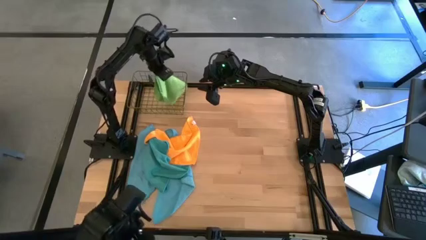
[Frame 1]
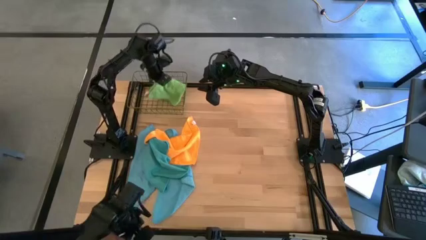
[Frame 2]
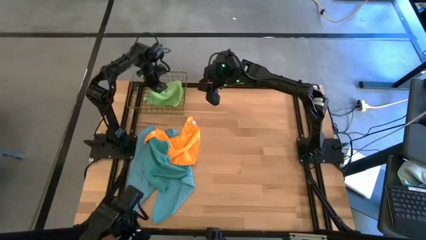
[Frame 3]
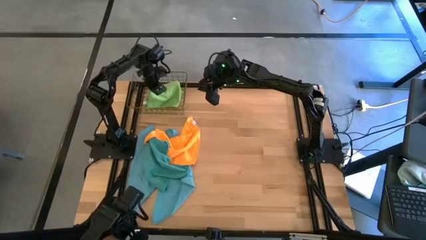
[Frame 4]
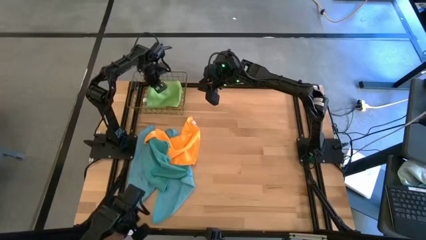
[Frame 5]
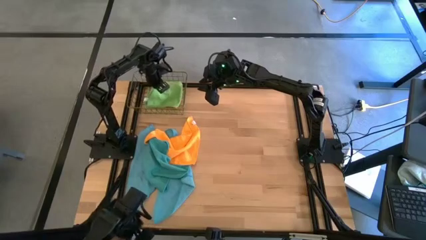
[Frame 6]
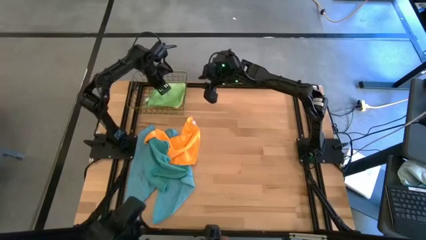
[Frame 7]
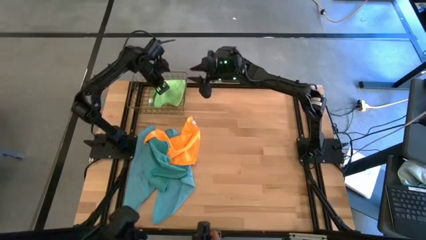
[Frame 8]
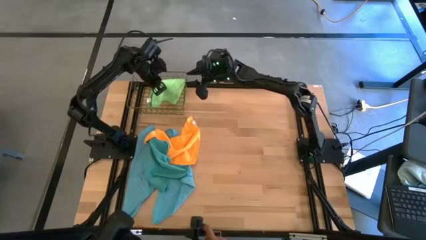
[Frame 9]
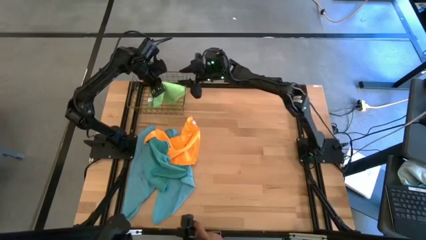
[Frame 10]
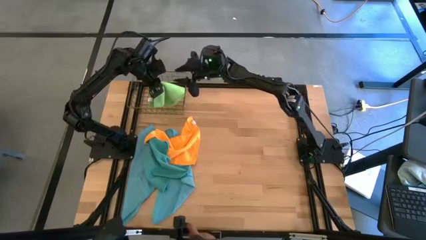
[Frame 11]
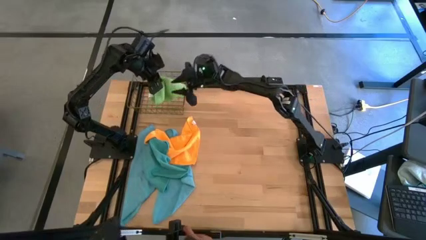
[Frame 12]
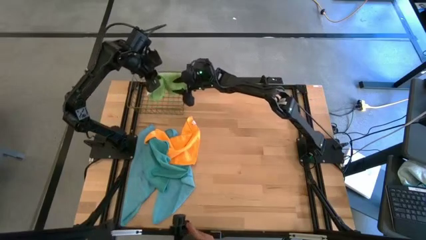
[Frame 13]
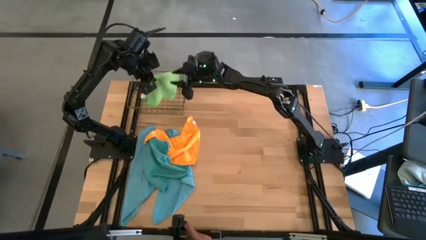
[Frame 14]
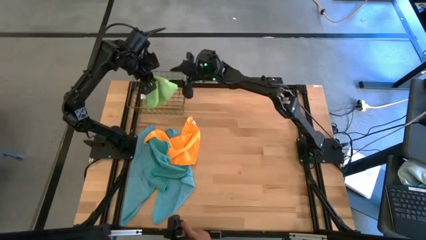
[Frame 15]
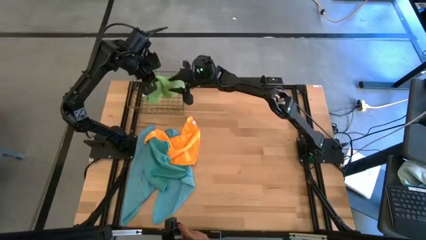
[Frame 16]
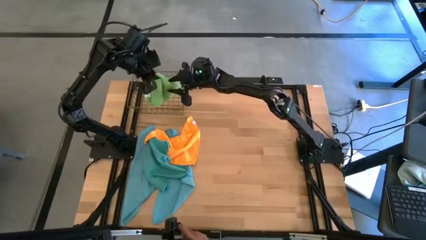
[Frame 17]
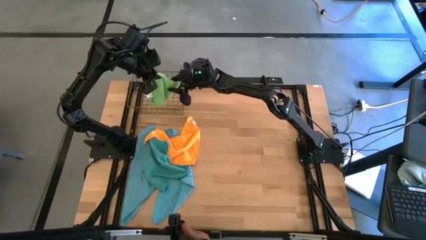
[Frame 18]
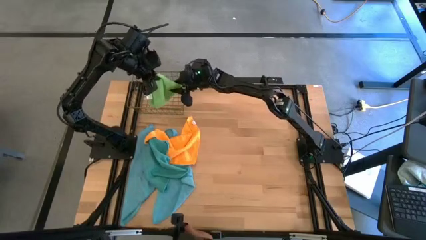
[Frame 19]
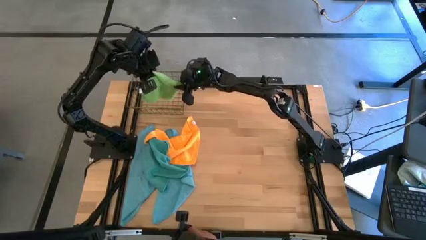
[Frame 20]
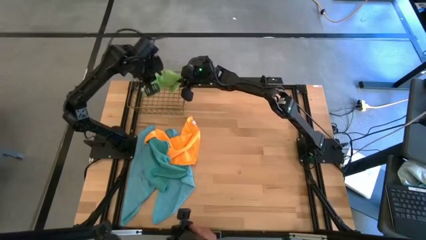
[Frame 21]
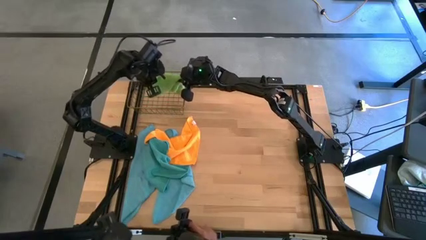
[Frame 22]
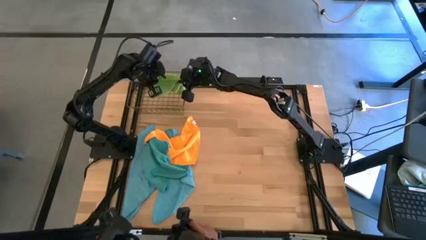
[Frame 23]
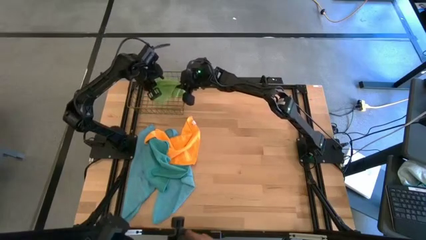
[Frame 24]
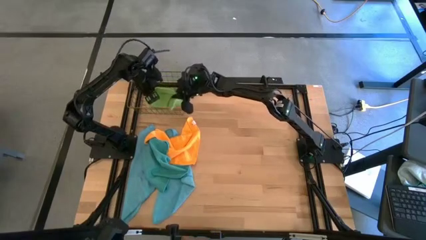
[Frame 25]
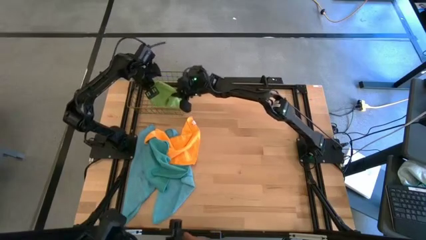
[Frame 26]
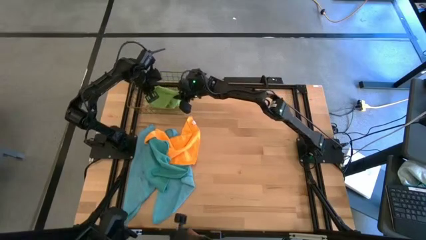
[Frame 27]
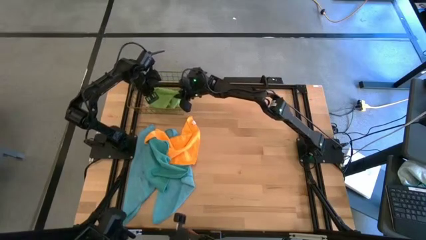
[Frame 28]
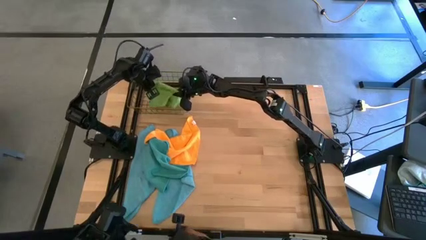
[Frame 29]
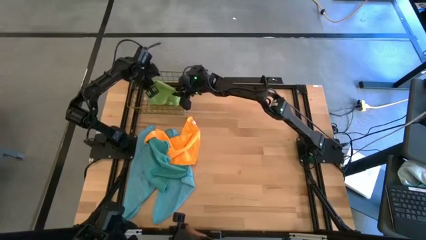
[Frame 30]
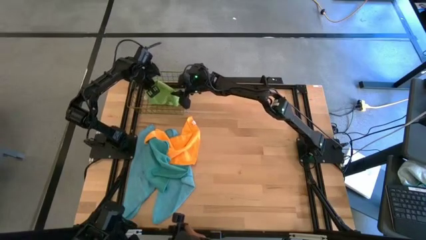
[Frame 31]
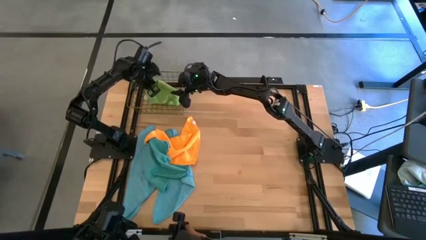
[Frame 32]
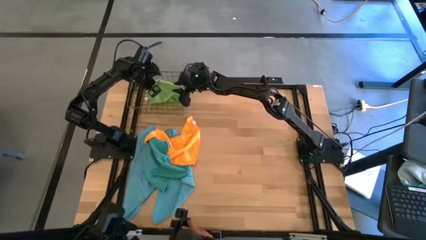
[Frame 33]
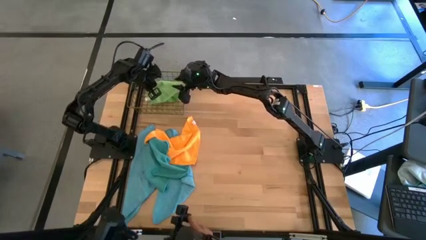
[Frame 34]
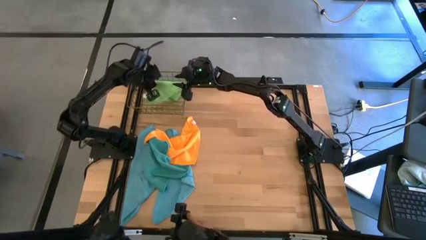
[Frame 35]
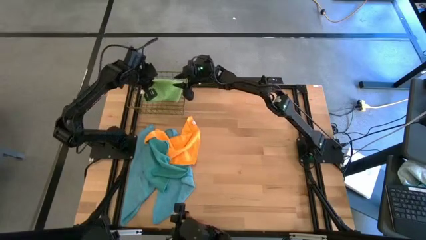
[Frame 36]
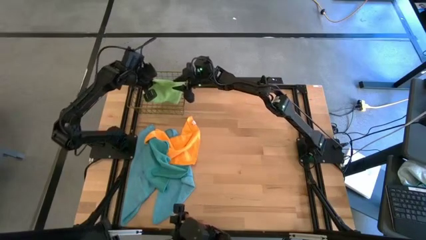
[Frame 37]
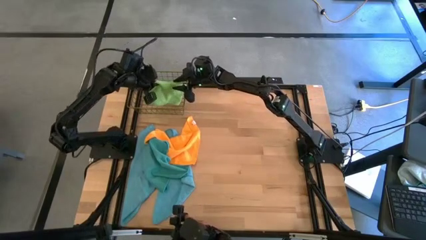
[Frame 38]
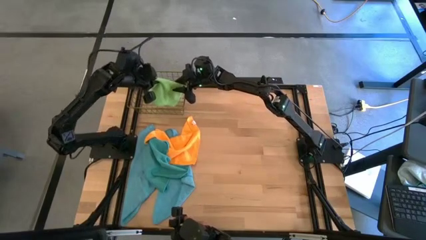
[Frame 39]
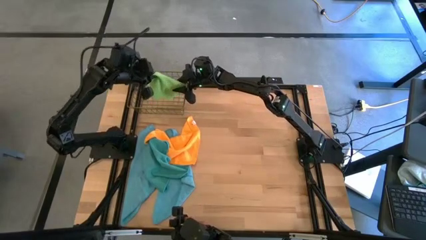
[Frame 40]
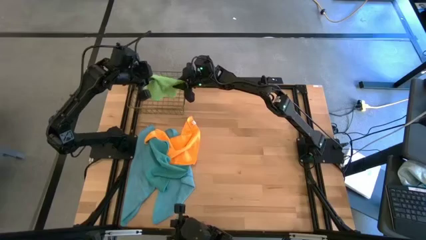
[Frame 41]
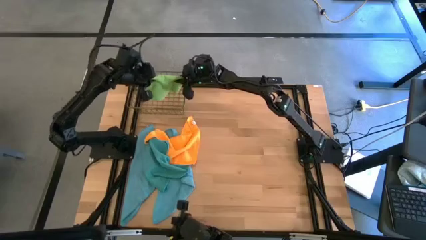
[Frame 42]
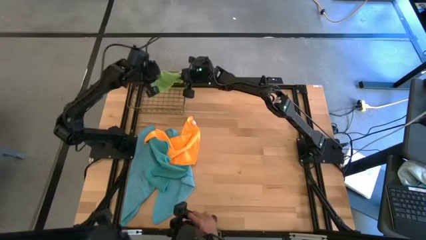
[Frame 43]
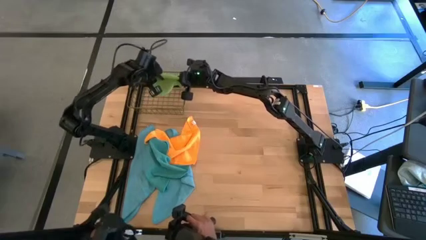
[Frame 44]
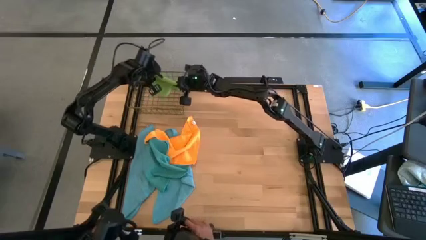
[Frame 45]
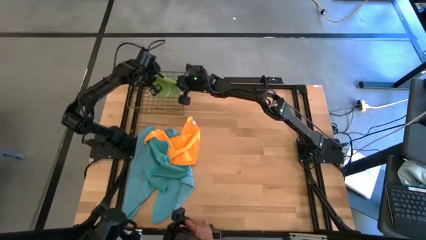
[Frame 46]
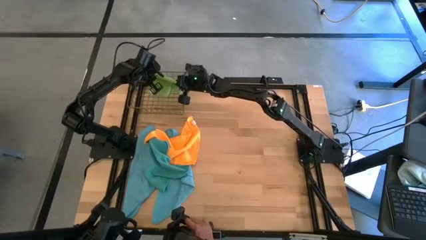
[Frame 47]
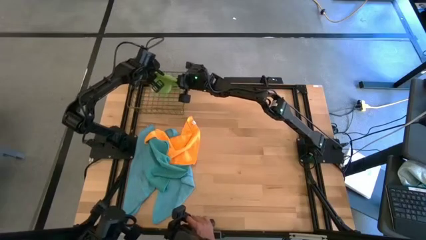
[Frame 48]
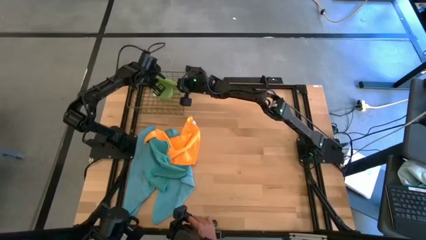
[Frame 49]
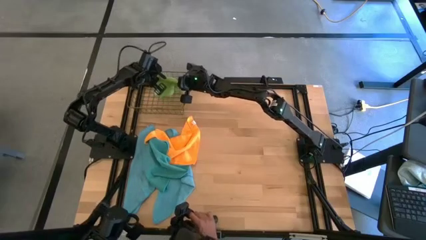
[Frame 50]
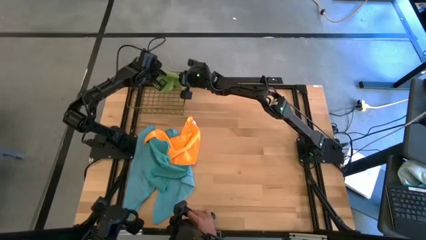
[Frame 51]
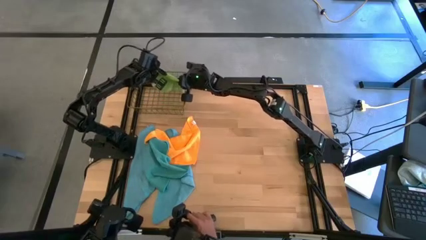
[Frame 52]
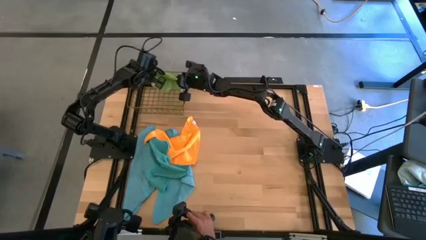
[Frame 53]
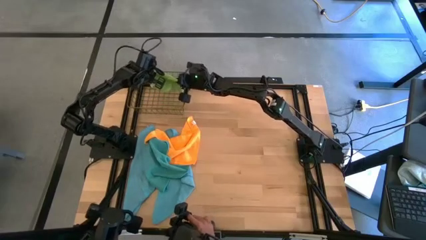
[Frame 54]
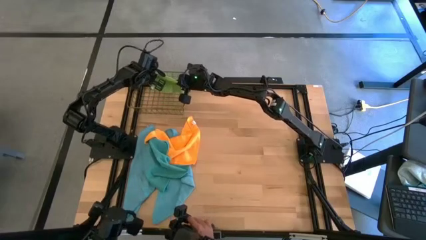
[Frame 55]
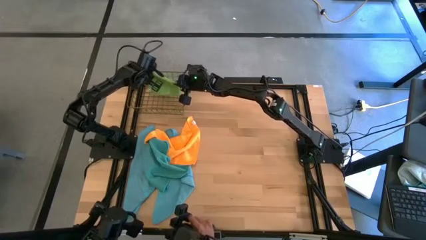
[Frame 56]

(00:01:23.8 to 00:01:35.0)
Task: Fold microfiber towels
Put the folded green microfiber cloth into the wire basket

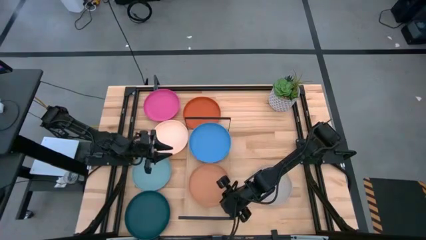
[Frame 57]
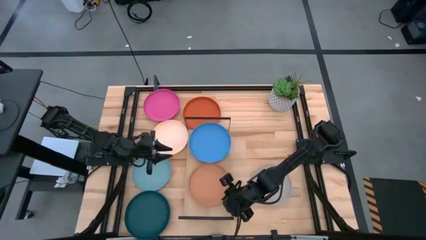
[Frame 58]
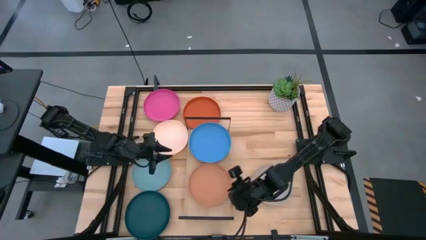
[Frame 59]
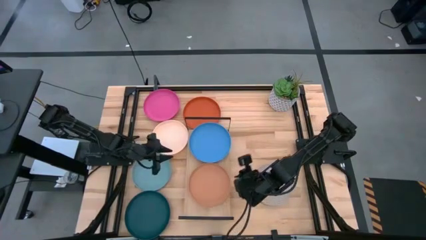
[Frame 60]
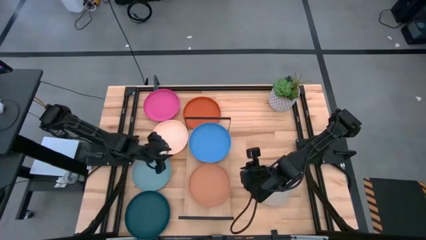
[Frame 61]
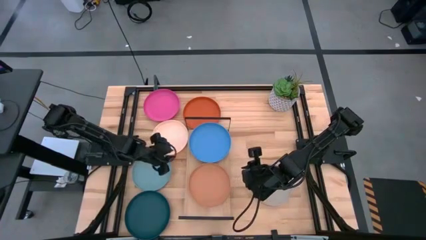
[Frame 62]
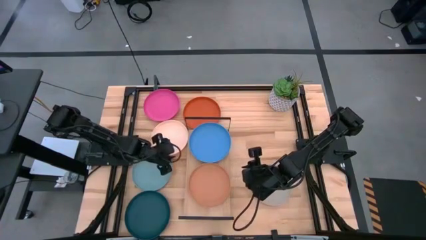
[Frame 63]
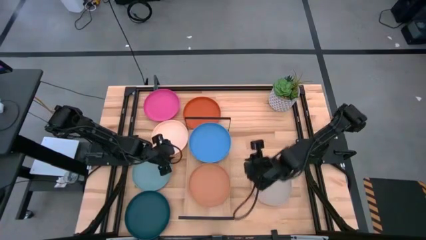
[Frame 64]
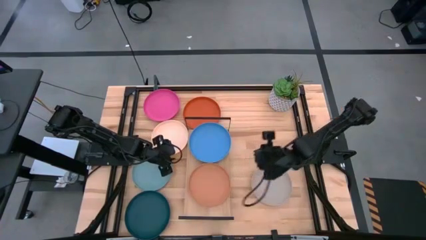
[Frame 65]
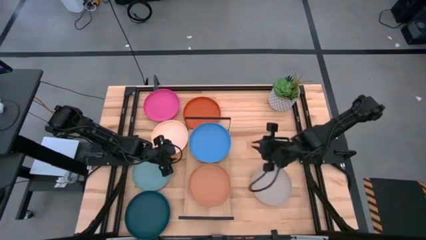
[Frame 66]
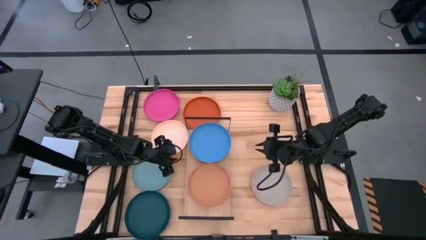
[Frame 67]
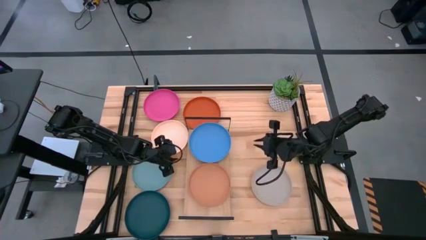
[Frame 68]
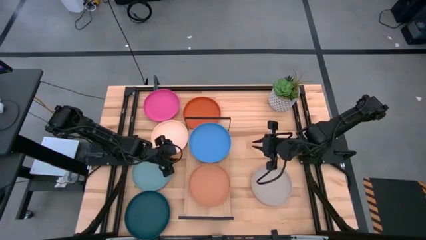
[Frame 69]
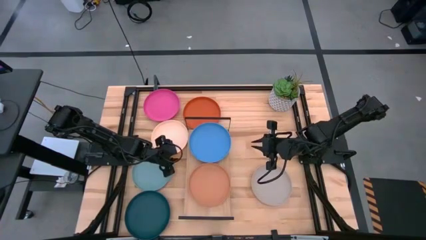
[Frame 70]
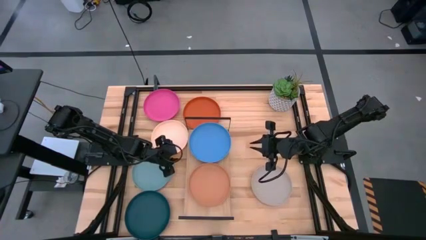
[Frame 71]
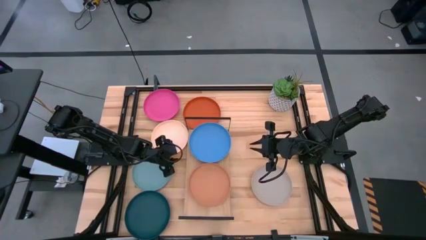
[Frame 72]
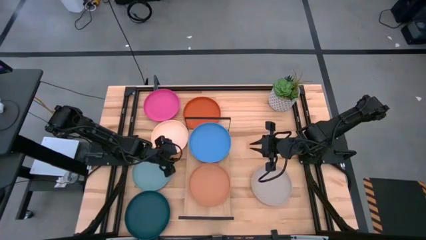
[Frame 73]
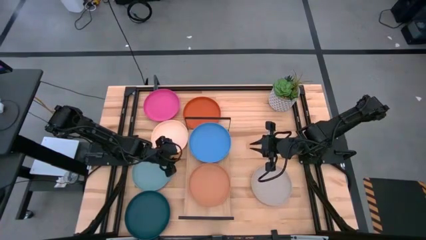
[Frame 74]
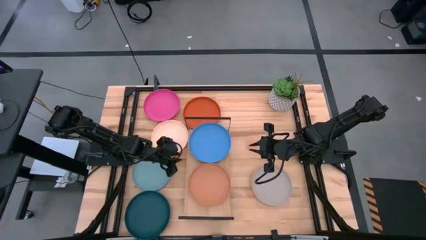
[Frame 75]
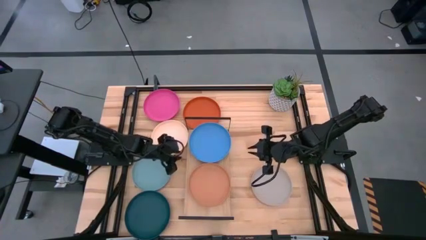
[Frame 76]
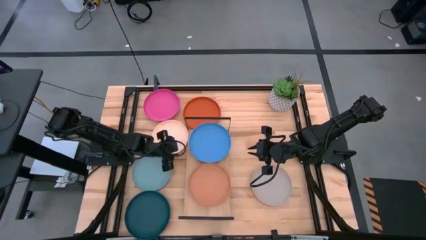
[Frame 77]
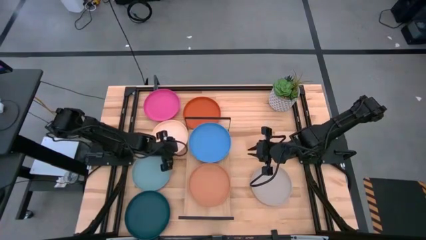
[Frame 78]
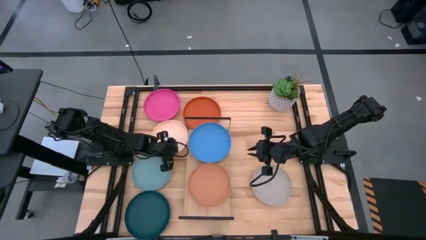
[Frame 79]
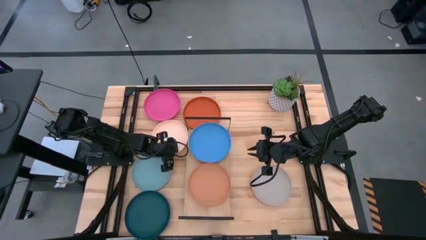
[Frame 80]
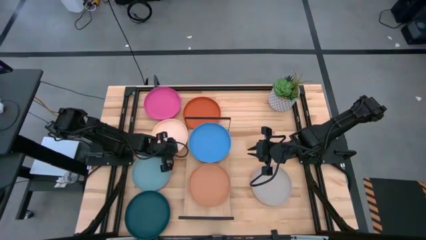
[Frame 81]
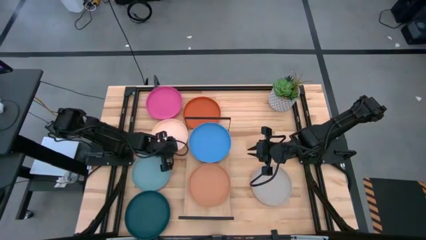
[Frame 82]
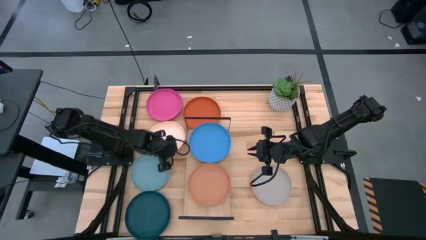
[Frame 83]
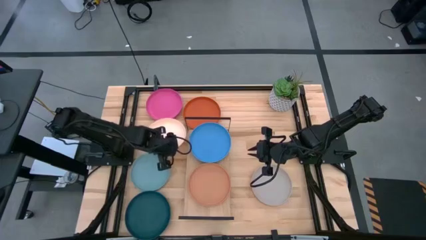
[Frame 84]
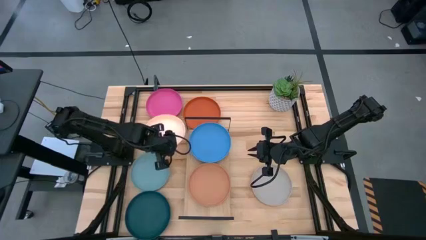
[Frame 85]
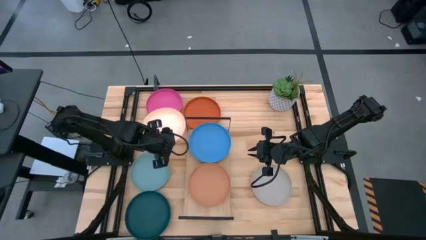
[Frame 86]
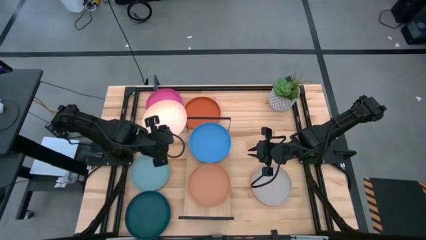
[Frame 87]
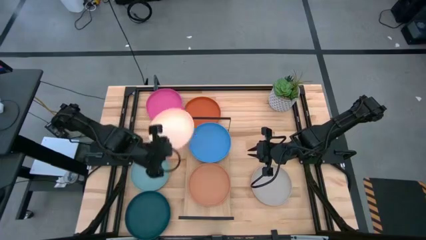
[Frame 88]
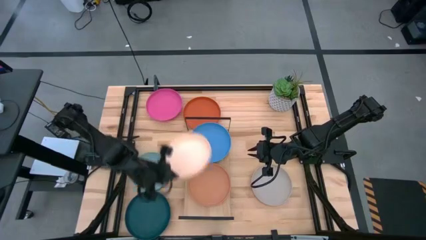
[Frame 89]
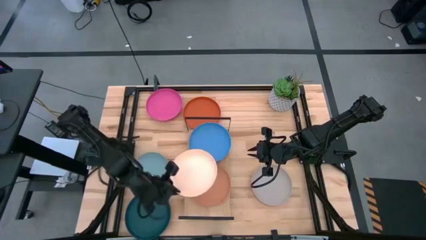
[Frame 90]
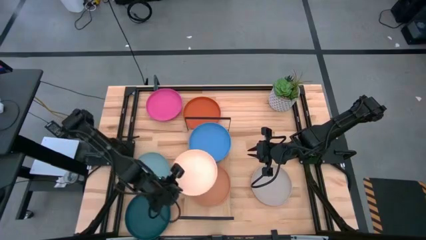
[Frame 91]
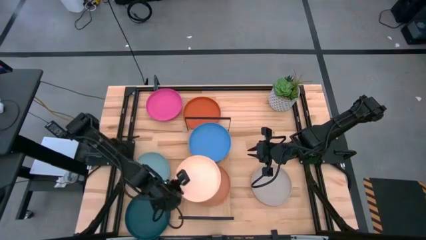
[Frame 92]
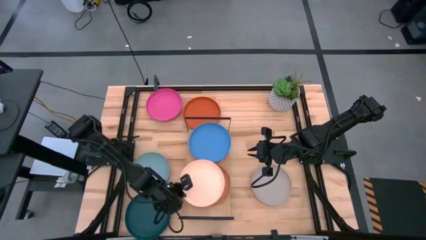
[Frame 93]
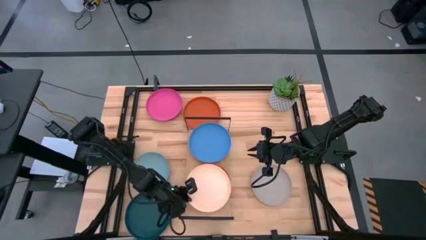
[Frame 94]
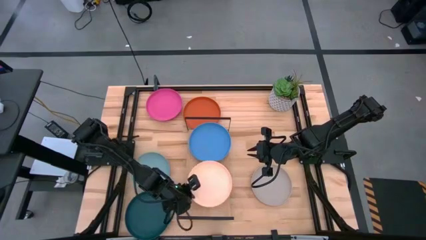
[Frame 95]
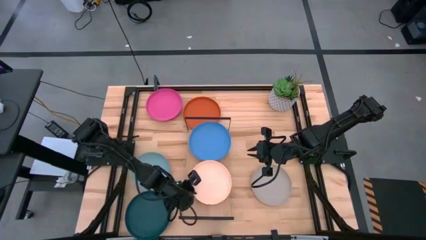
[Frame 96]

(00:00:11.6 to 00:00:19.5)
Task: Place and stack plates onto a shelf
Stack the light pink on top of the light brown plate
